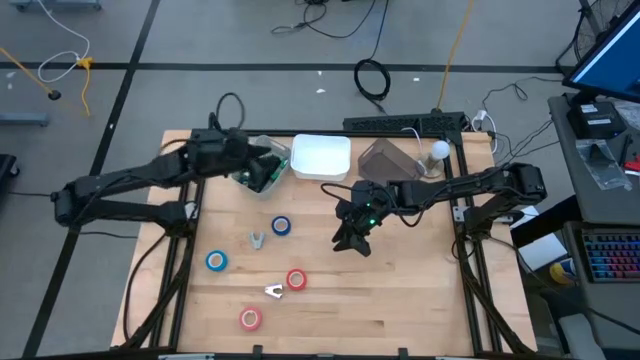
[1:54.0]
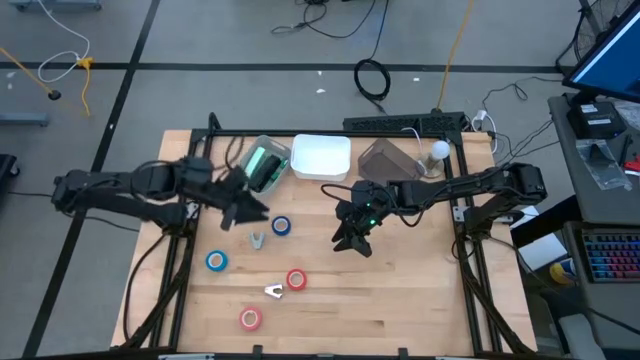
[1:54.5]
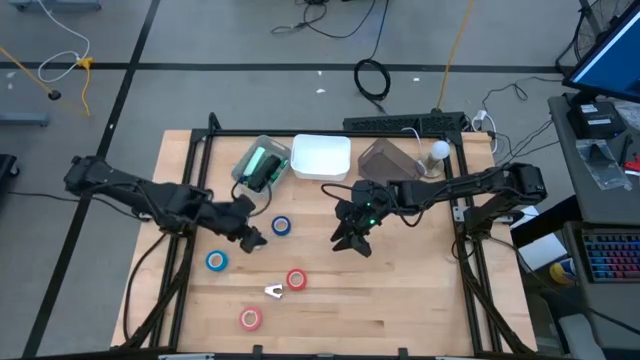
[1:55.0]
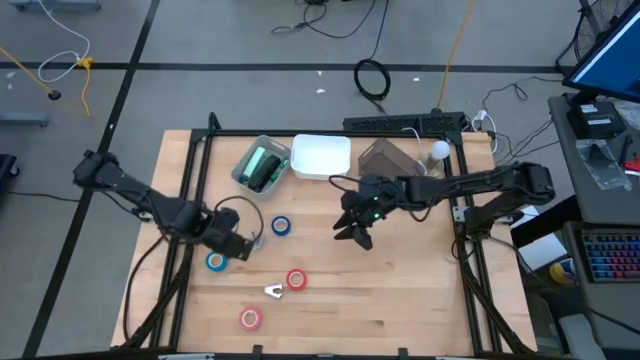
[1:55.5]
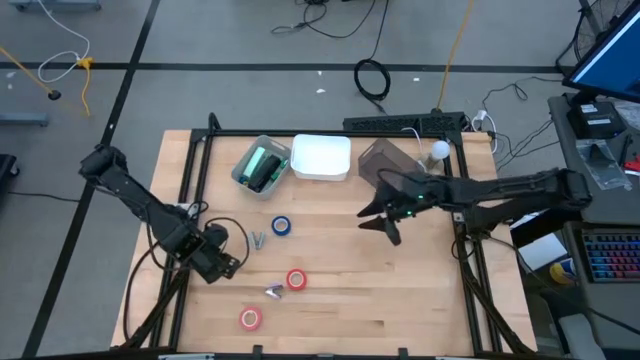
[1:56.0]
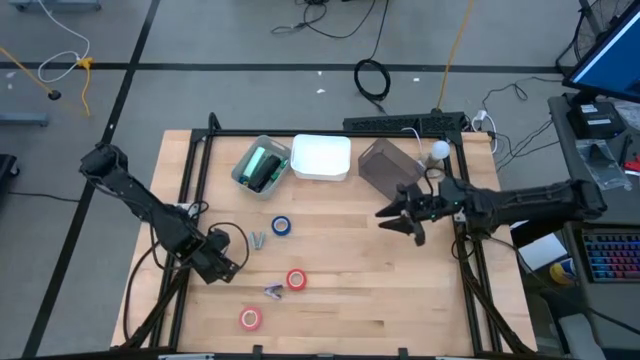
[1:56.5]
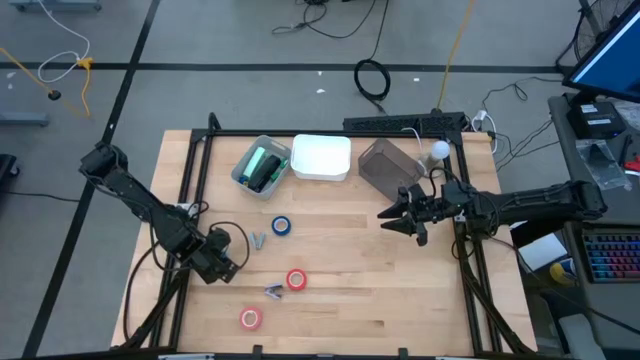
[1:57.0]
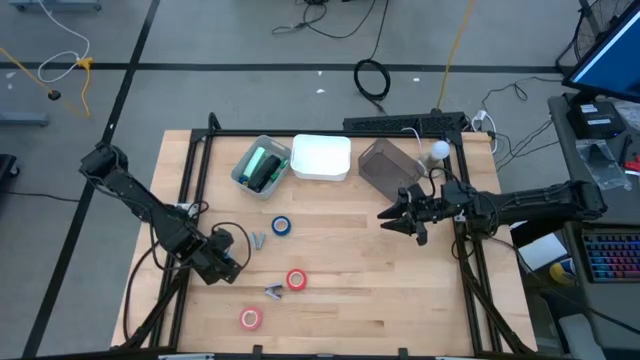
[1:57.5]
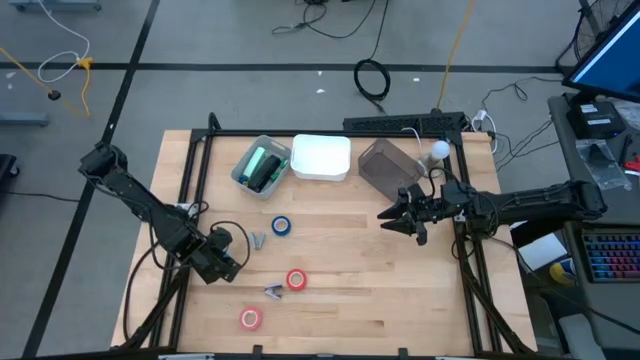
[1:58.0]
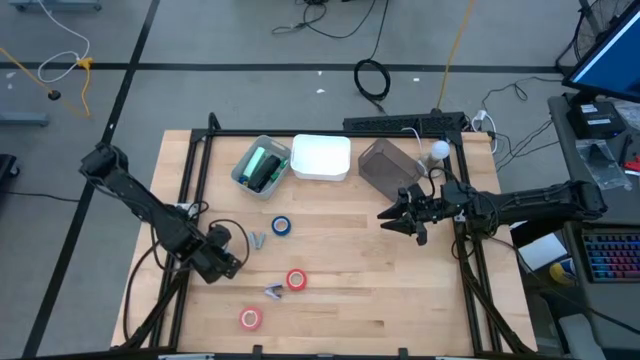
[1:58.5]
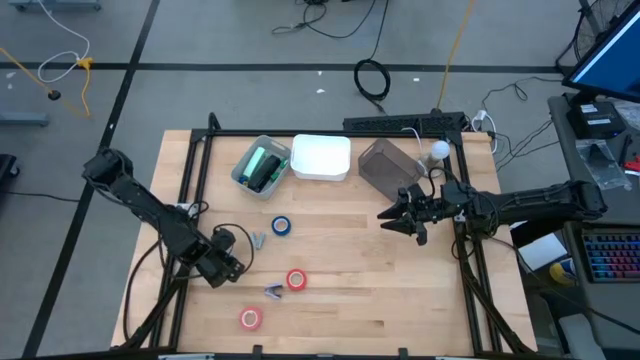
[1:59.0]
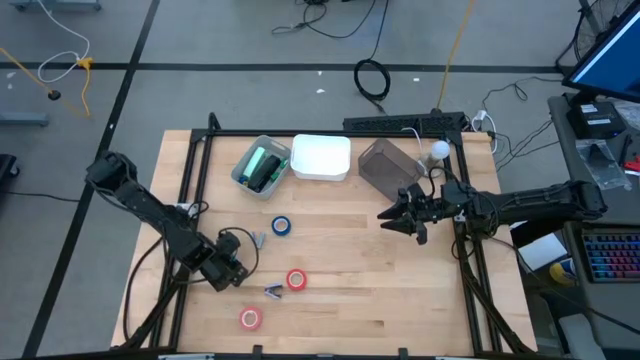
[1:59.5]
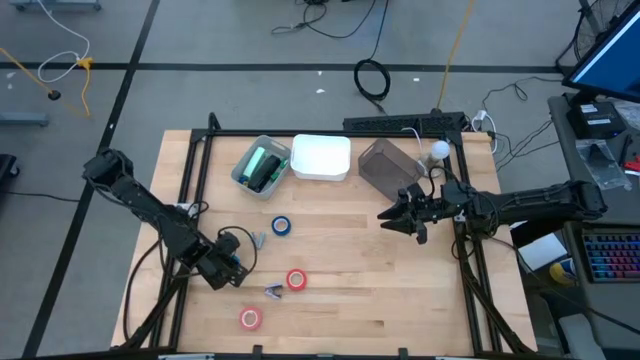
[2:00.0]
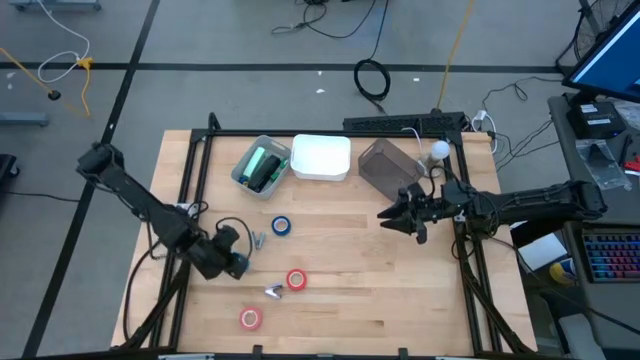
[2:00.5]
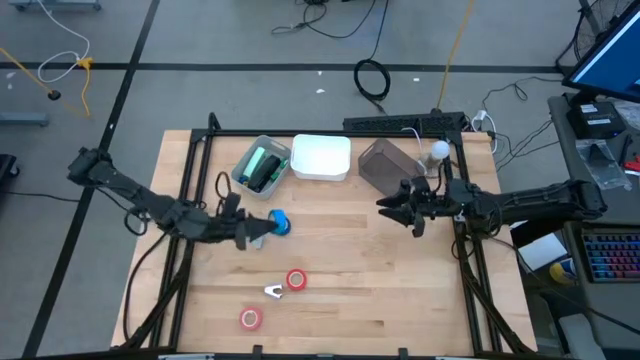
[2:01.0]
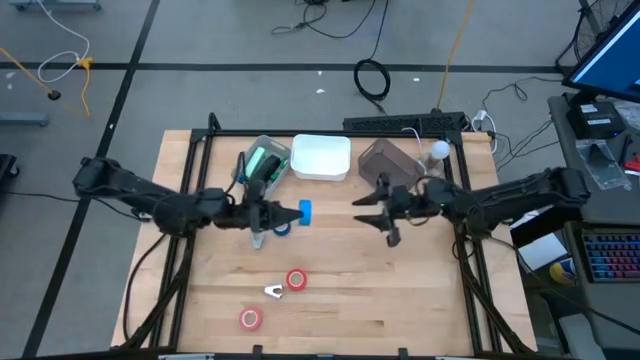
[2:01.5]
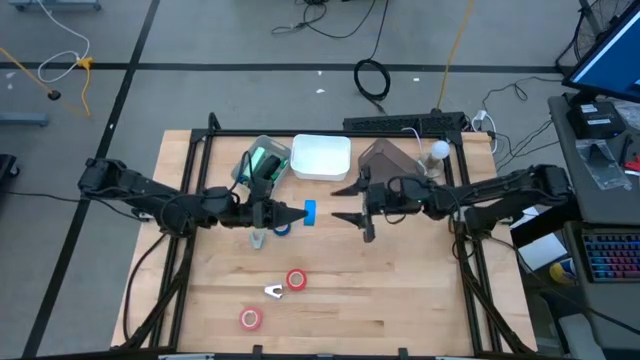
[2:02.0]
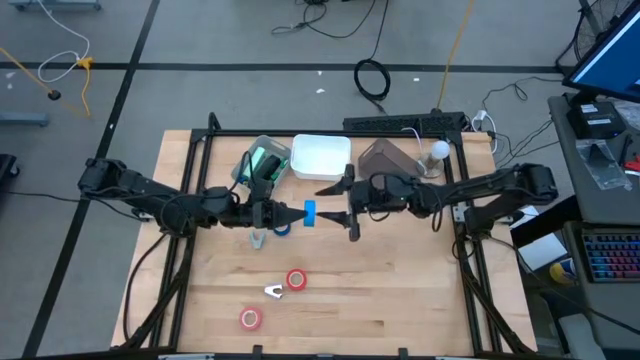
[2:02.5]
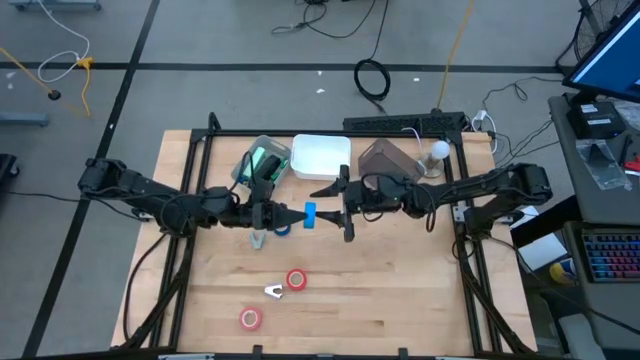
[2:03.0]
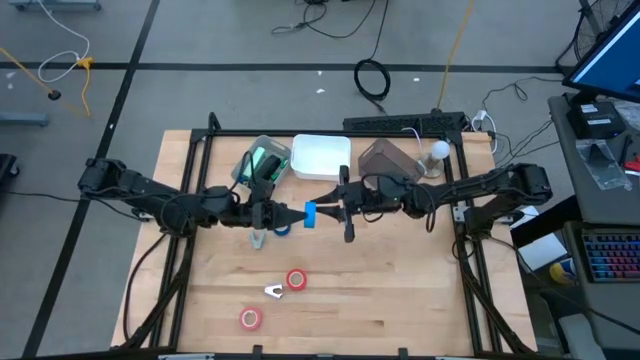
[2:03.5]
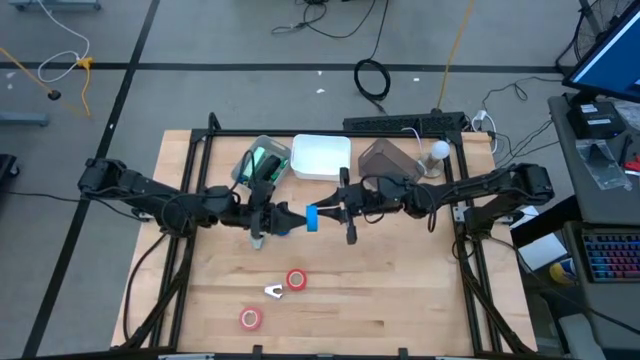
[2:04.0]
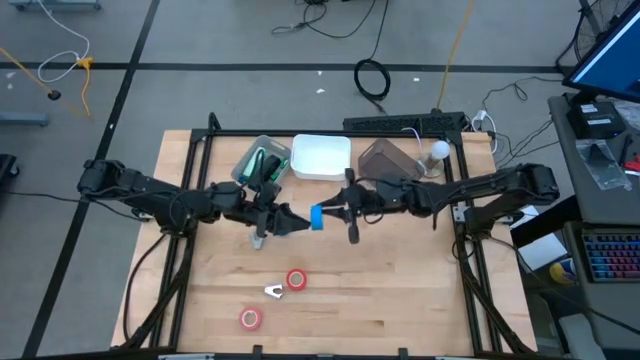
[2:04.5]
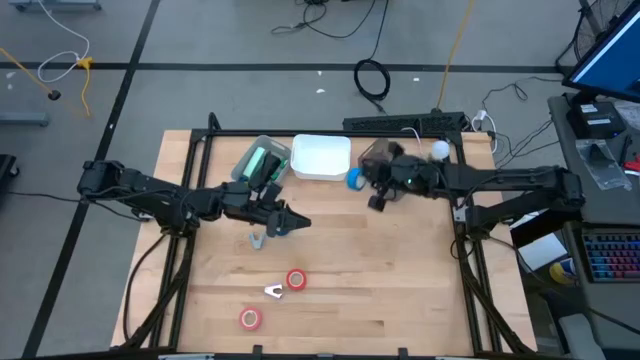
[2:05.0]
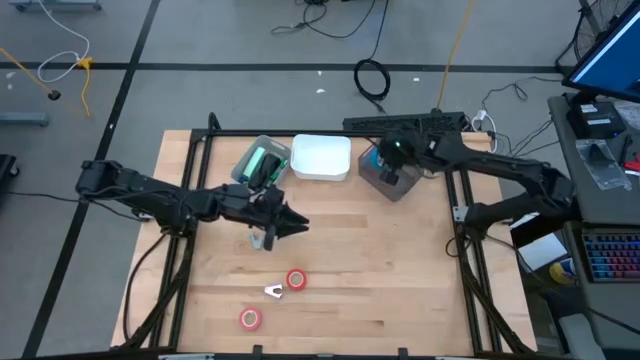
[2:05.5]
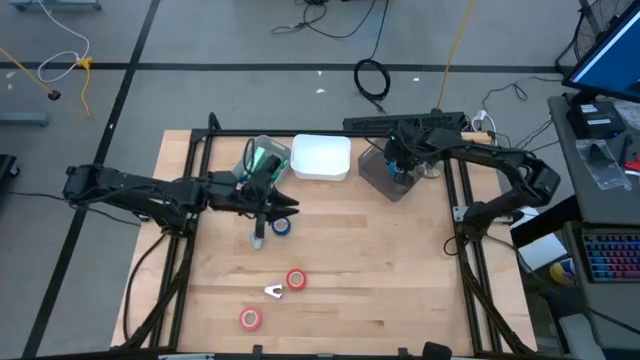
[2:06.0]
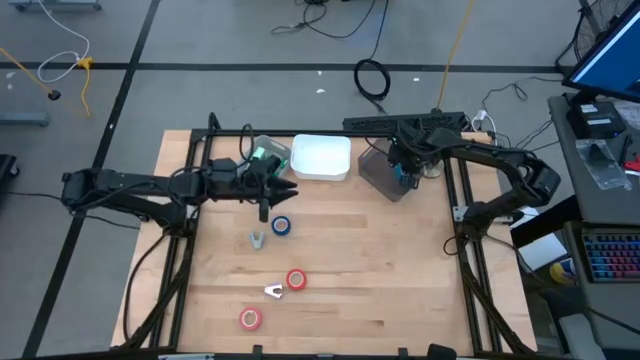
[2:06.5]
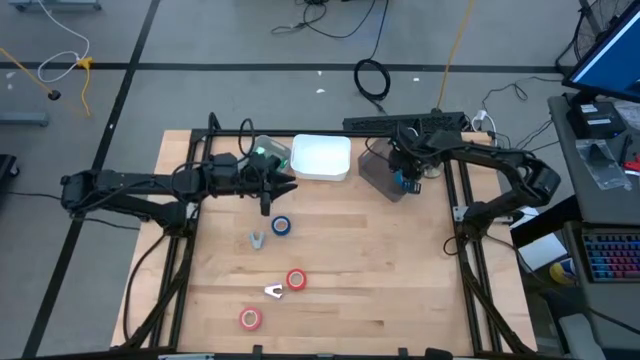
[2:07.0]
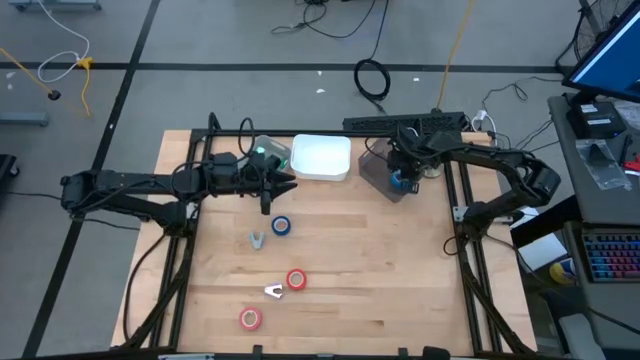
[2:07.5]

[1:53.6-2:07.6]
Task: Pick and place Stapler, Stapler remover, tape
Put the blue tape into the black bin

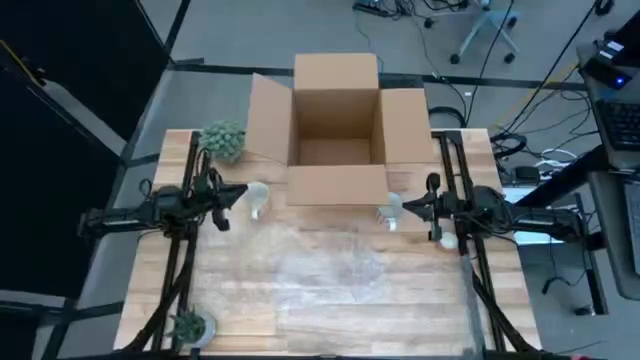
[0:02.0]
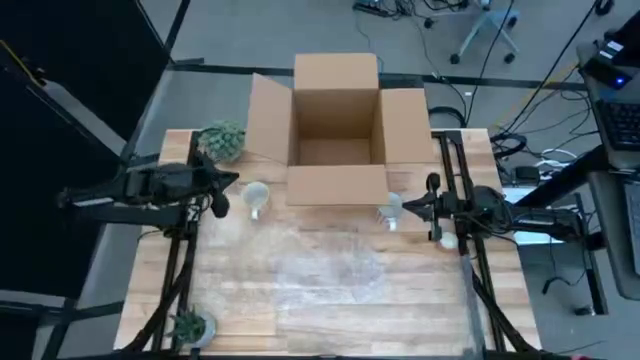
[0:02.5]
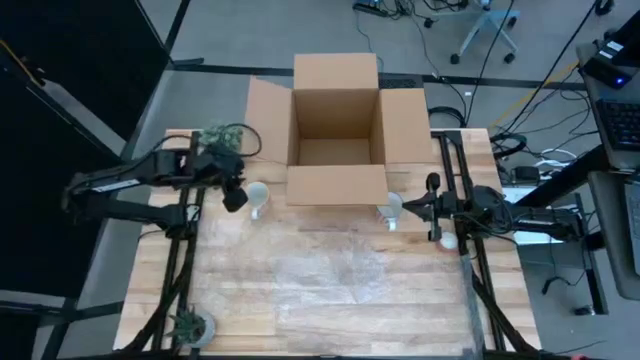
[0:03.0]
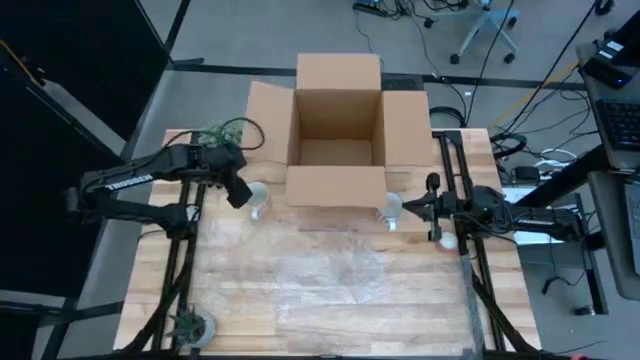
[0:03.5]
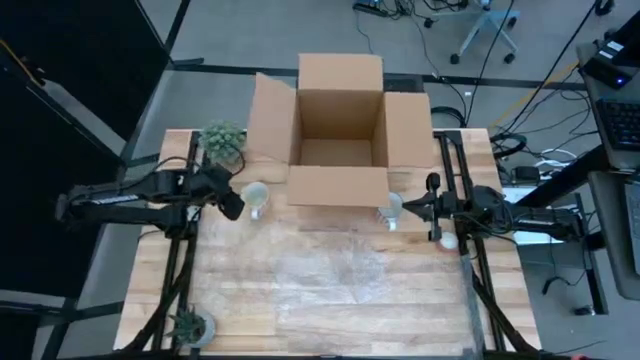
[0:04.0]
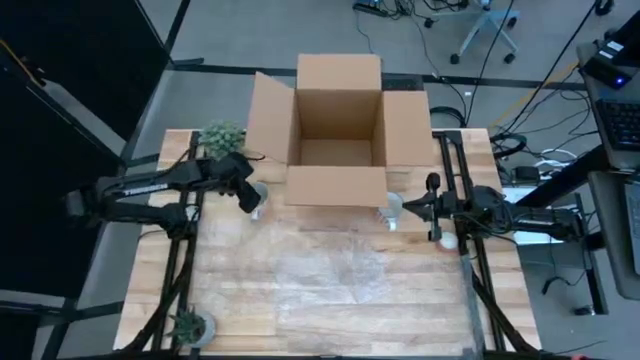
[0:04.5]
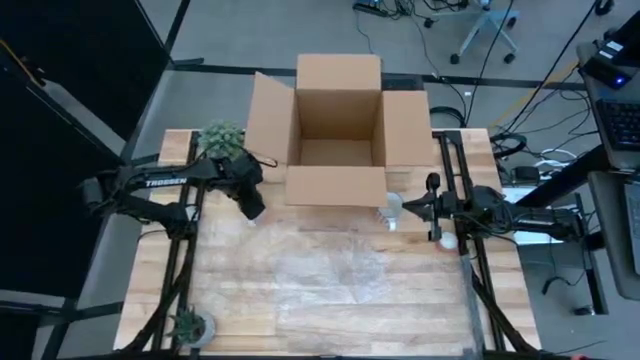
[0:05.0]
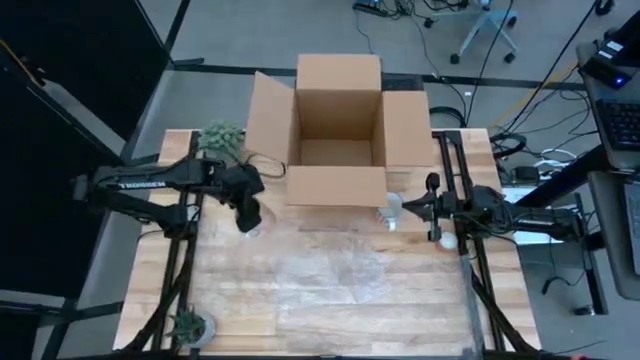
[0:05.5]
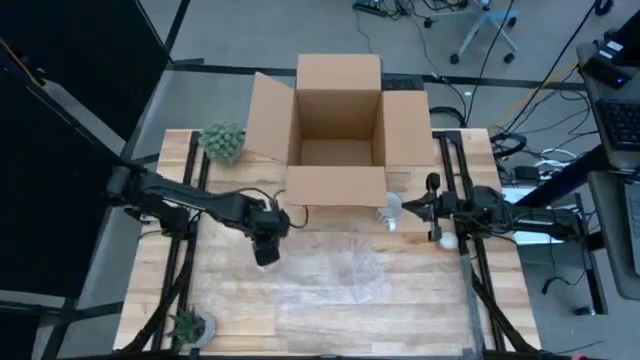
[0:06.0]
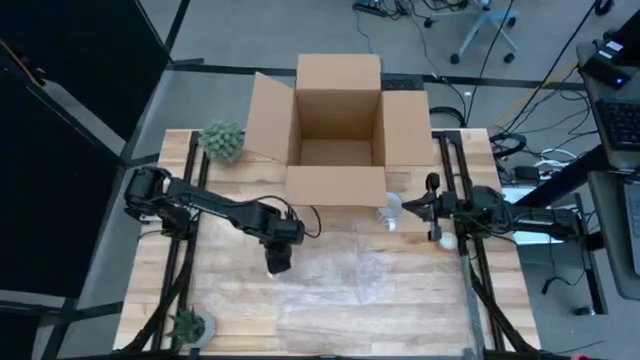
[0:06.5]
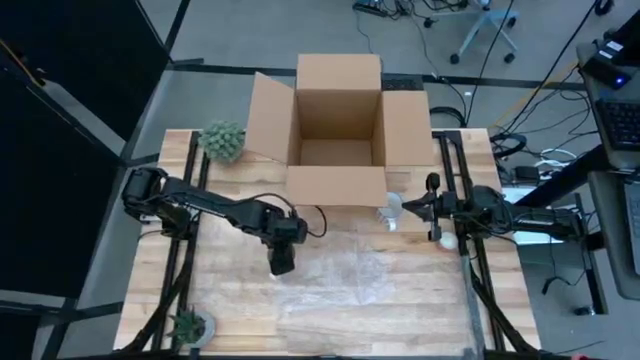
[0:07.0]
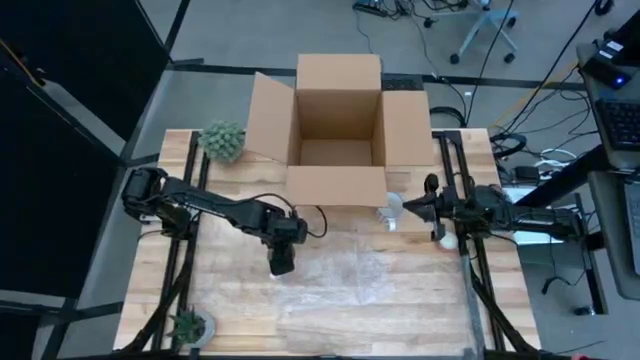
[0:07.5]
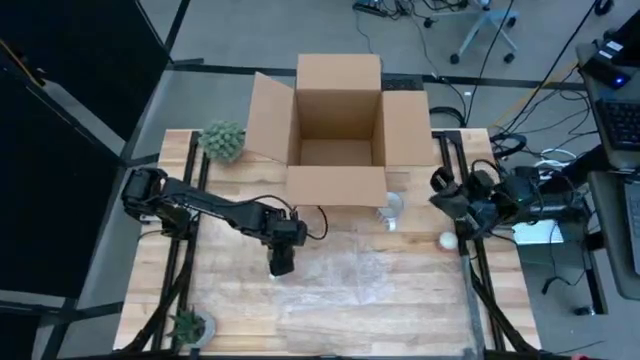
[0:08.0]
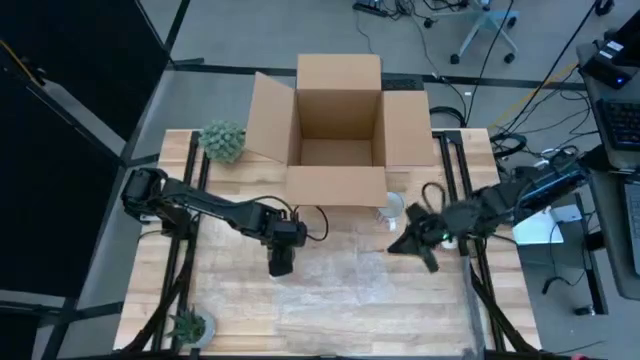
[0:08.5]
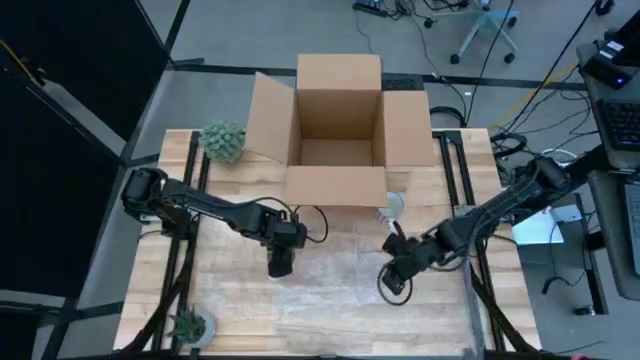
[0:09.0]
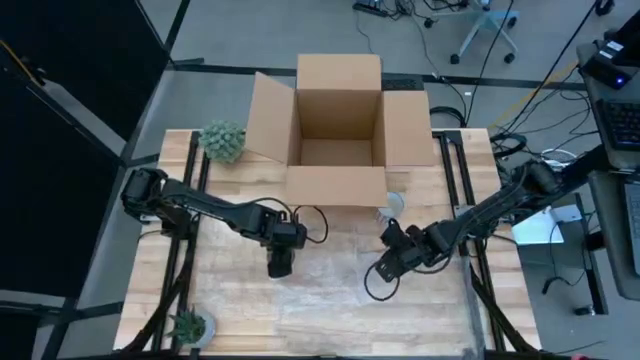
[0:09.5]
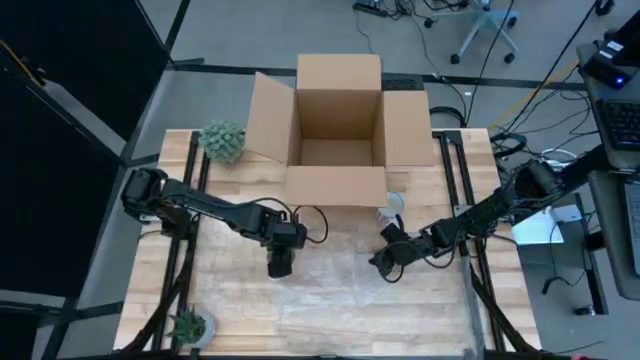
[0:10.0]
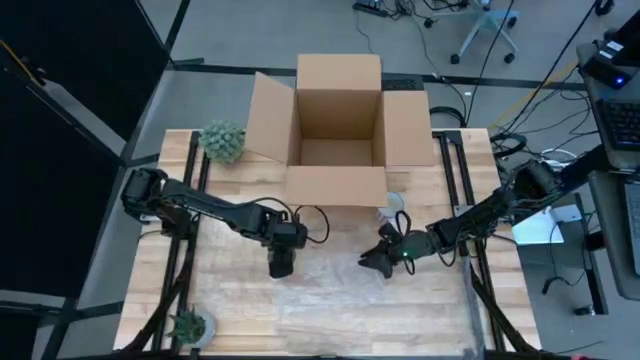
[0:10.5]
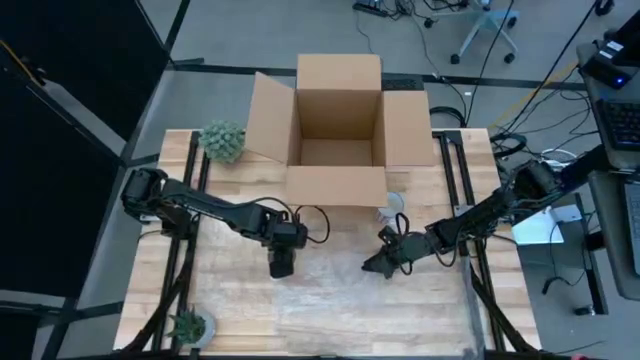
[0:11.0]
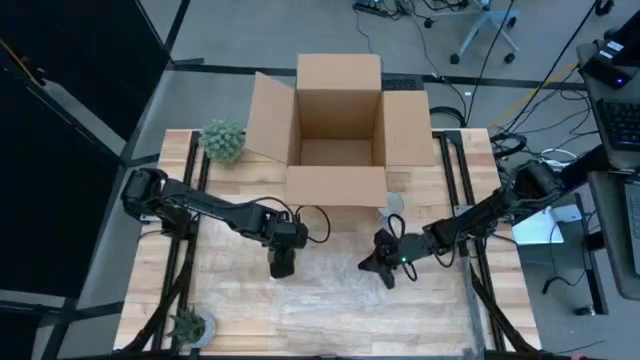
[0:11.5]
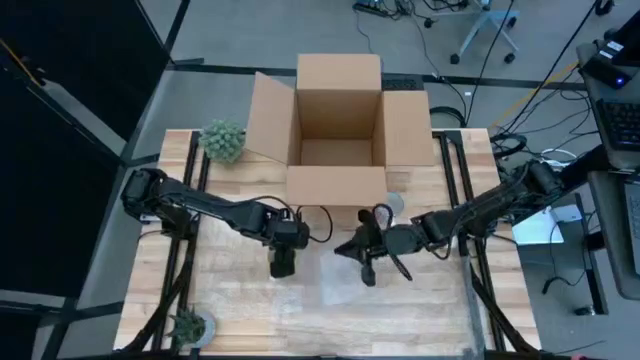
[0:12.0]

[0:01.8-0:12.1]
Task: wrap mug
Put the orange mug on the bubble wrap
